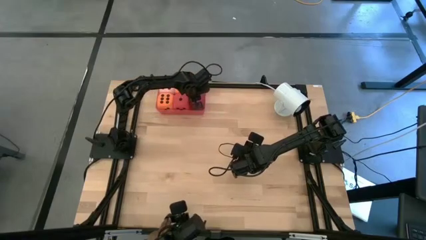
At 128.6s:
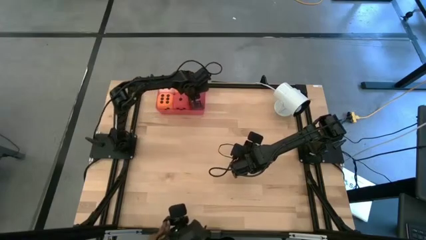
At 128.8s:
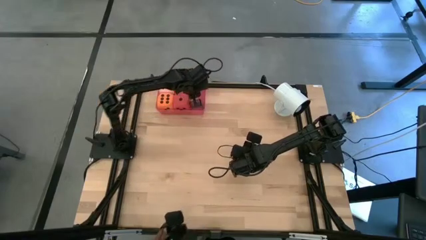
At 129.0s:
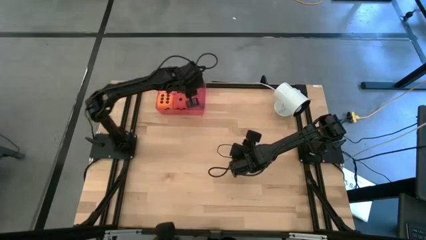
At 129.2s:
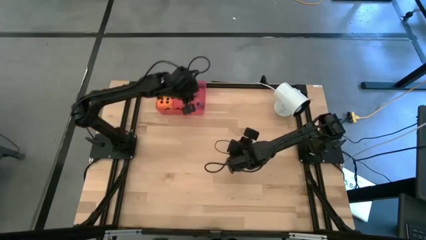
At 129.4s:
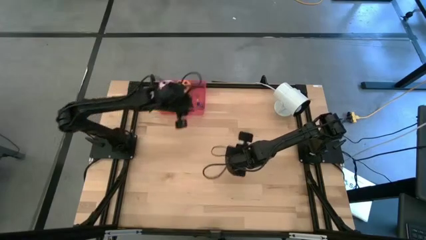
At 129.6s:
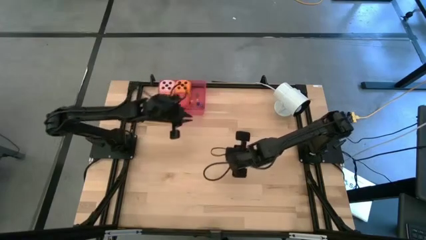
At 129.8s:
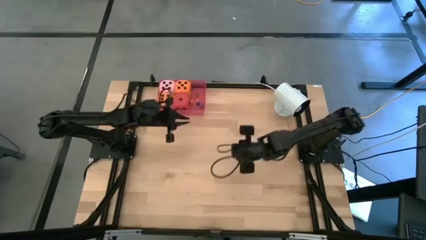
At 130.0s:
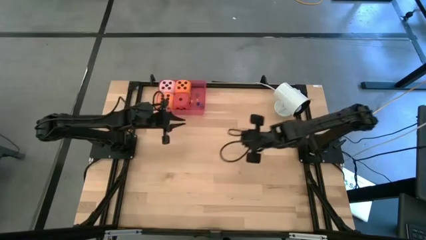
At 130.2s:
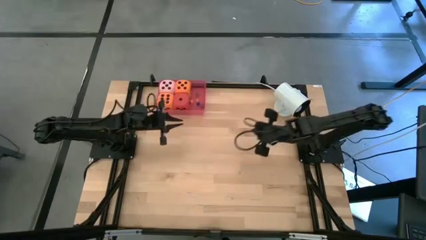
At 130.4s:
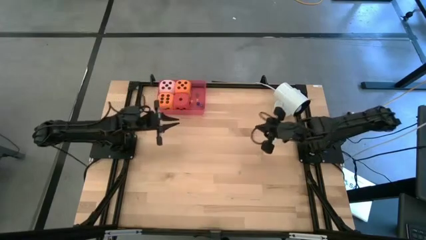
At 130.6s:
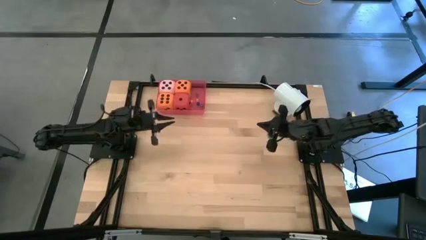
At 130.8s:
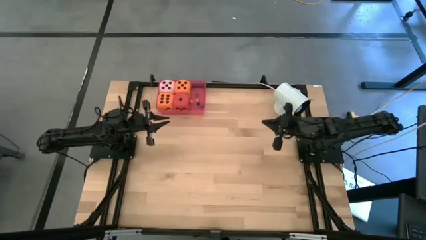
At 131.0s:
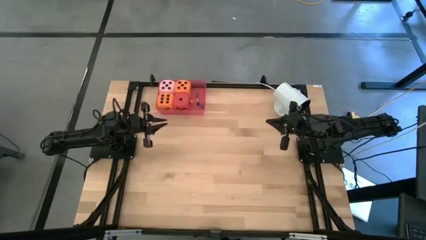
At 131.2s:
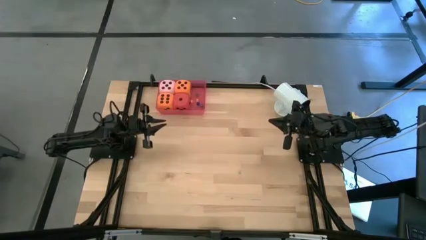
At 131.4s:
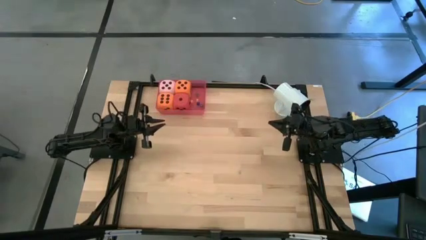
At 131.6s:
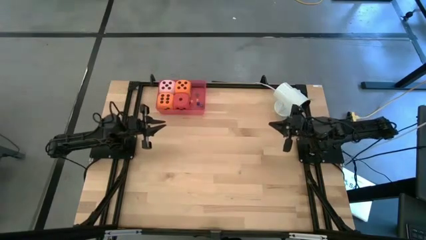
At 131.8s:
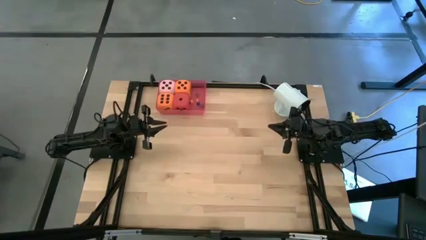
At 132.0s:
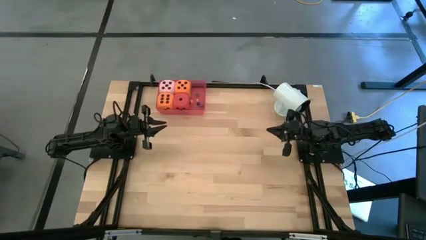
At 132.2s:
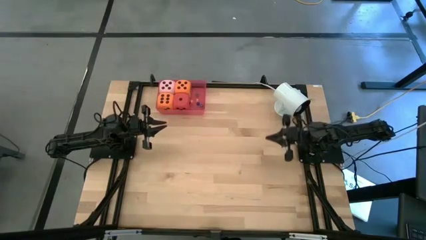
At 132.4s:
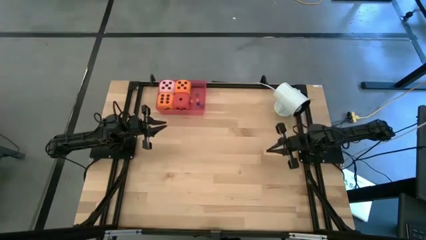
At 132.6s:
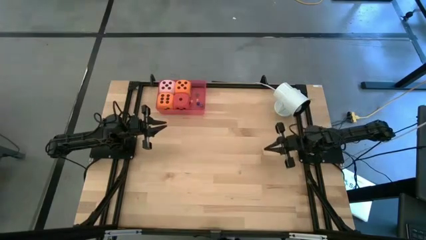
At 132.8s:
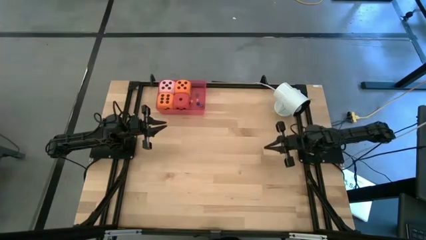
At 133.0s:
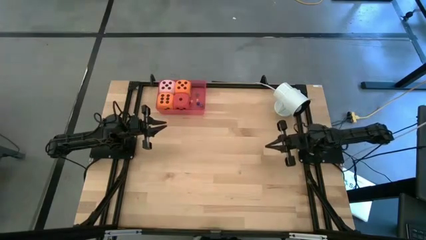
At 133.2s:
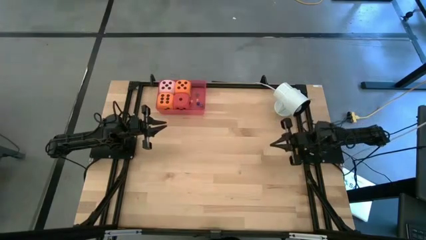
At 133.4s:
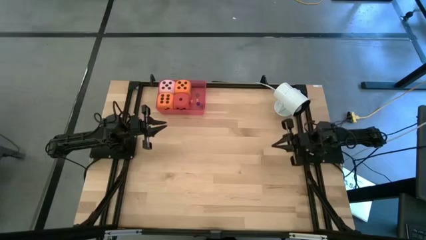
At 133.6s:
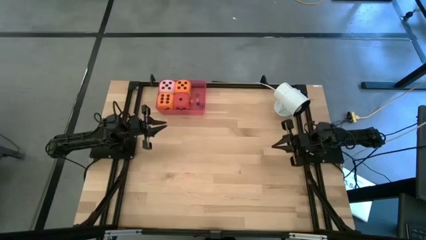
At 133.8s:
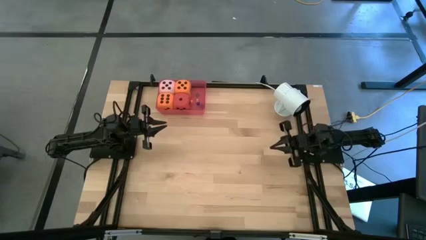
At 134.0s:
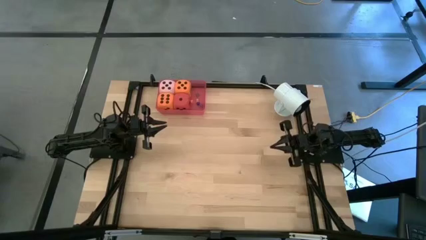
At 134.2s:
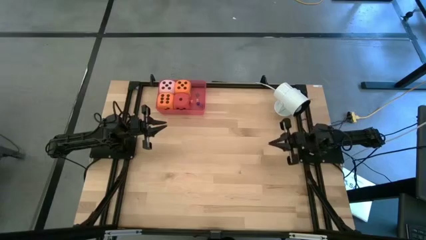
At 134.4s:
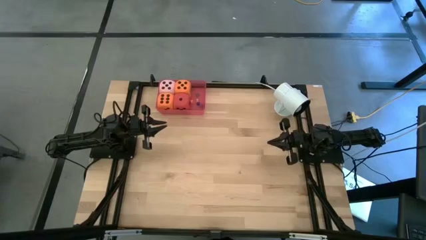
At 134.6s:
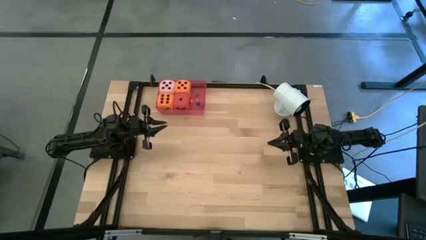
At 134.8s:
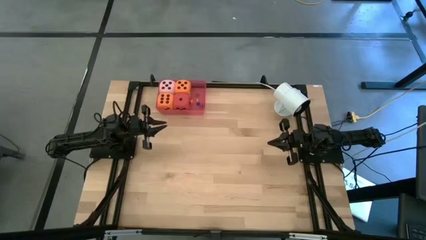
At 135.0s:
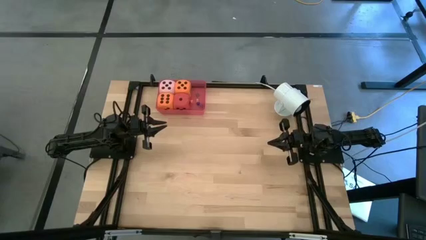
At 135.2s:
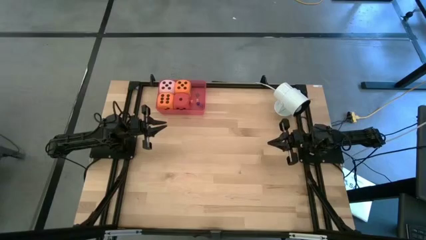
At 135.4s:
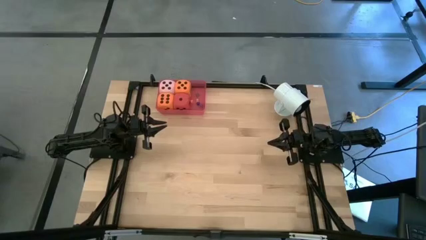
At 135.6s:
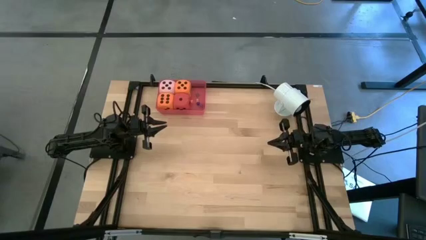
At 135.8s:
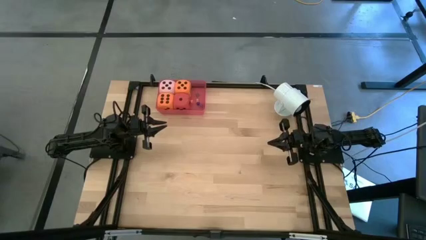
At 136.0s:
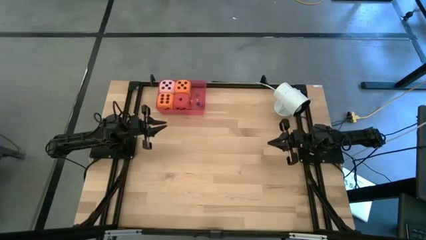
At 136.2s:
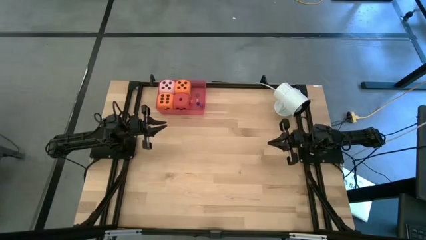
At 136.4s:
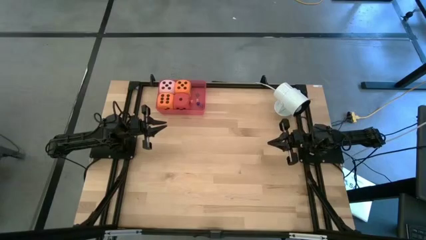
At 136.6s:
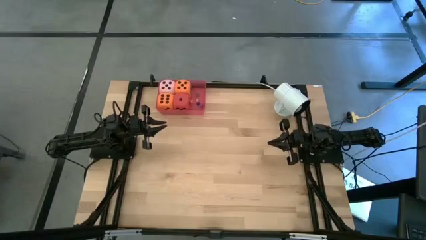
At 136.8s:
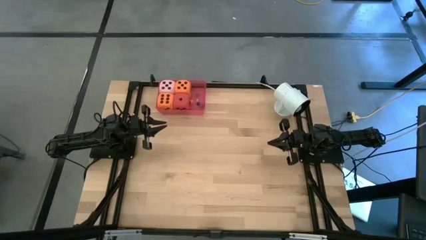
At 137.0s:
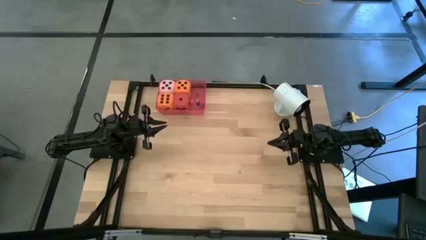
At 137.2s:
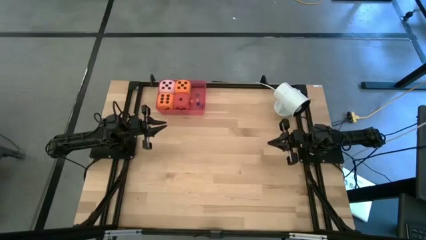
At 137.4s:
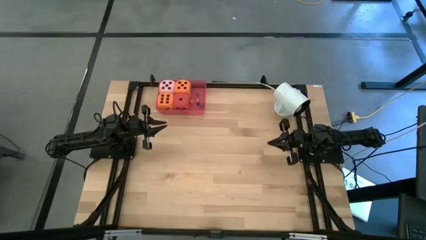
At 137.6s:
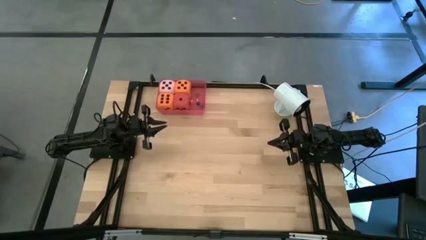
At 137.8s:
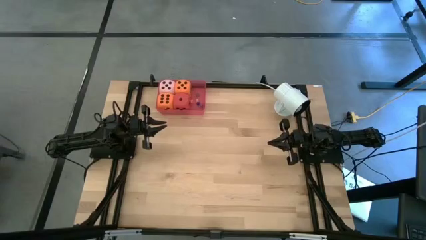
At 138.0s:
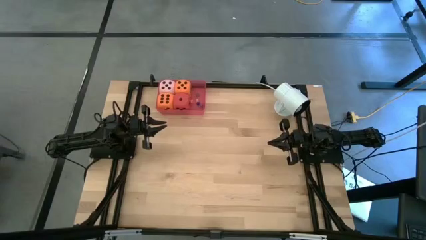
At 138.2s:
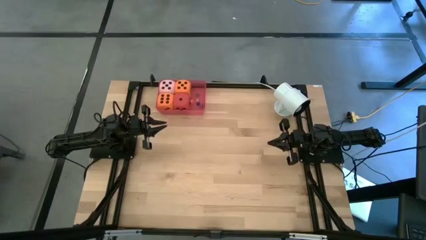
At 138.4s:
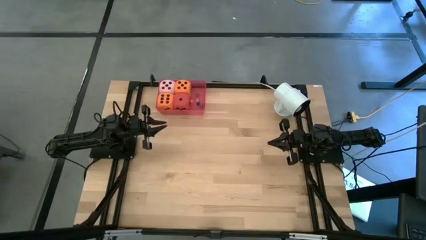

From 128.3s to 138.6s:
Task: Pick & Place Dice
Return to Home Position

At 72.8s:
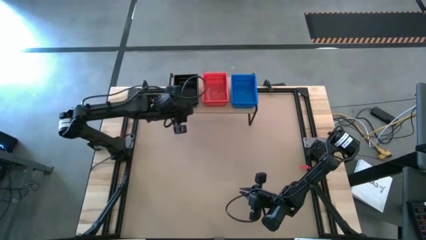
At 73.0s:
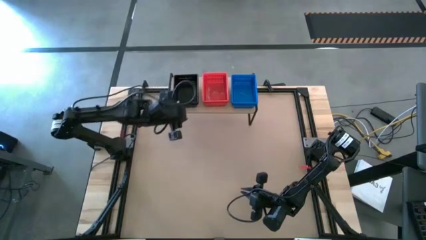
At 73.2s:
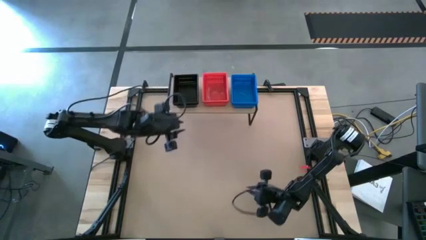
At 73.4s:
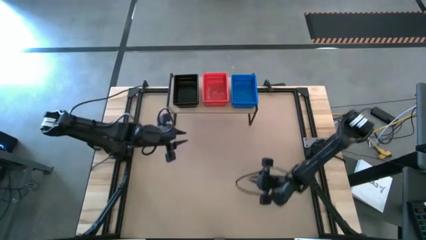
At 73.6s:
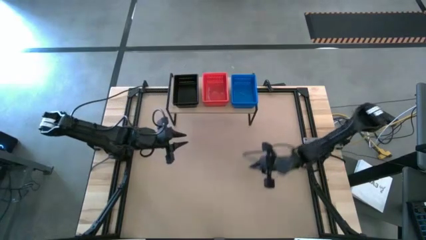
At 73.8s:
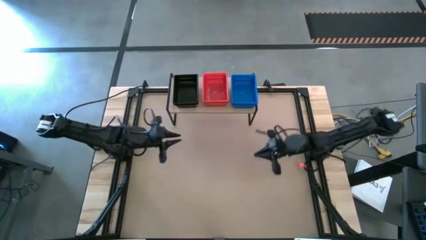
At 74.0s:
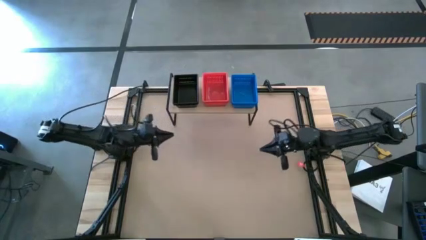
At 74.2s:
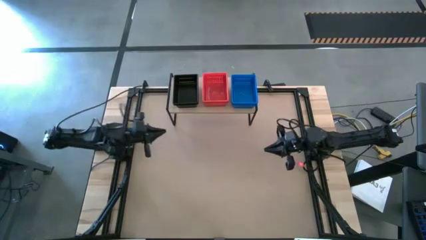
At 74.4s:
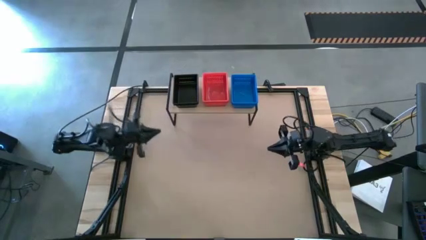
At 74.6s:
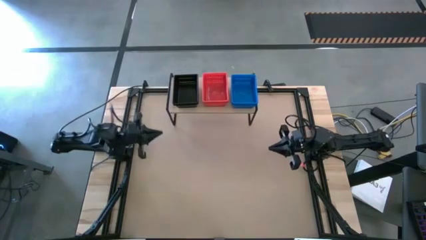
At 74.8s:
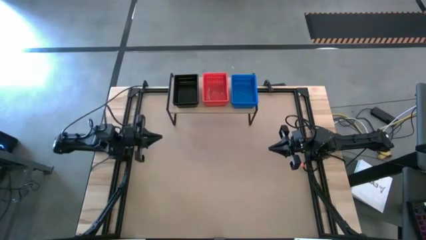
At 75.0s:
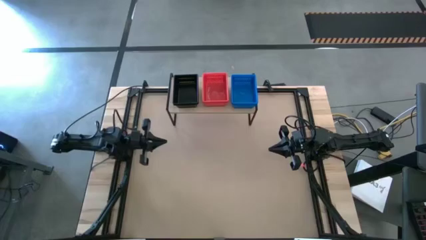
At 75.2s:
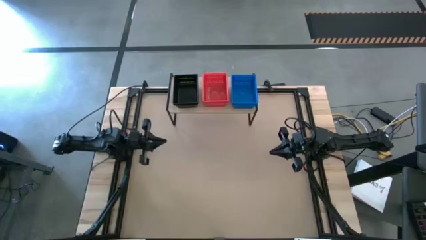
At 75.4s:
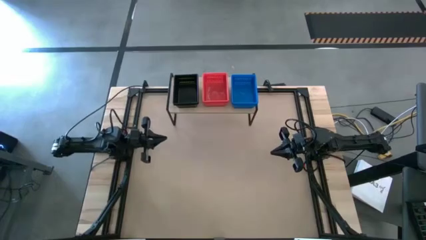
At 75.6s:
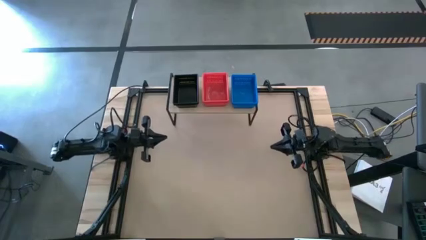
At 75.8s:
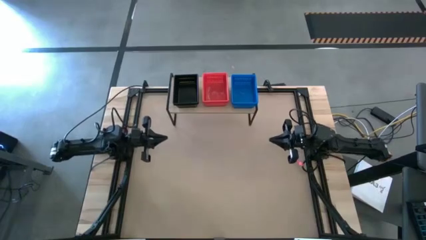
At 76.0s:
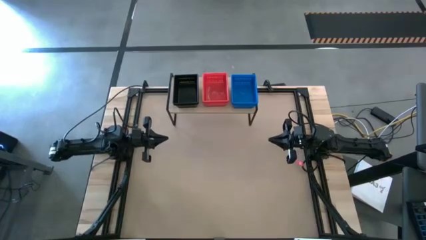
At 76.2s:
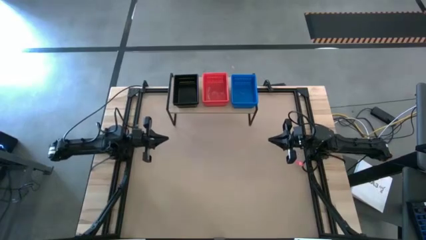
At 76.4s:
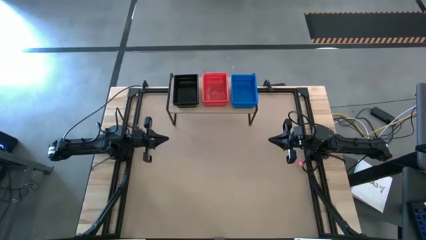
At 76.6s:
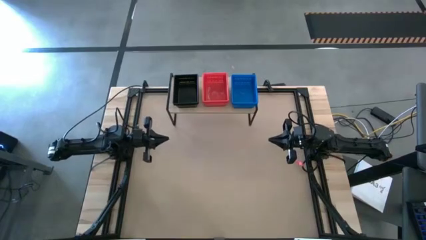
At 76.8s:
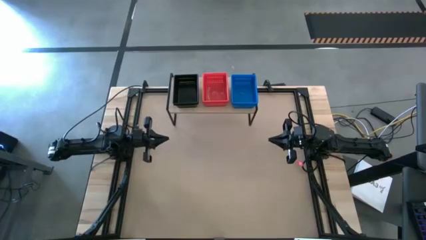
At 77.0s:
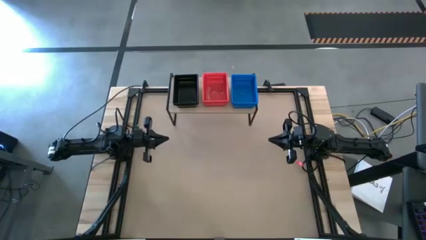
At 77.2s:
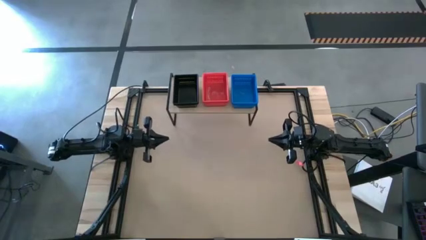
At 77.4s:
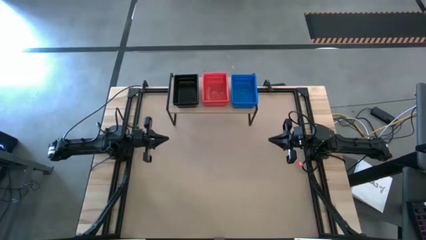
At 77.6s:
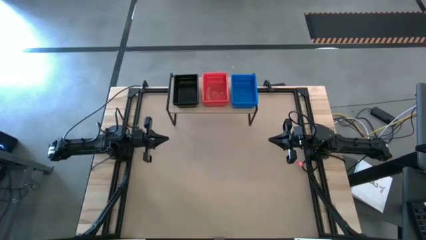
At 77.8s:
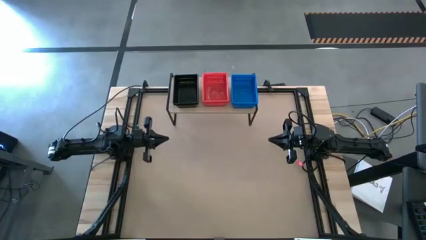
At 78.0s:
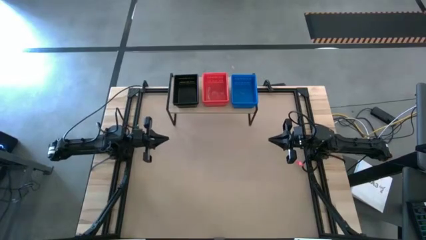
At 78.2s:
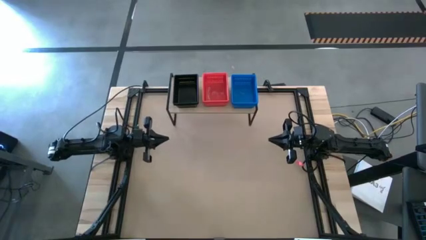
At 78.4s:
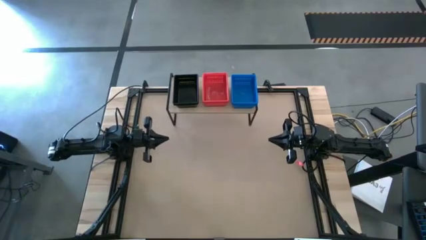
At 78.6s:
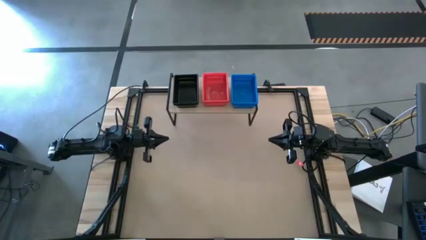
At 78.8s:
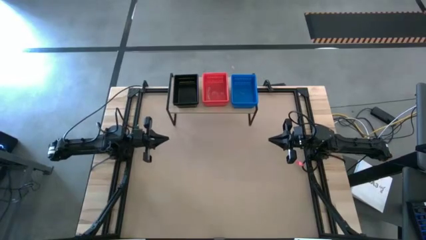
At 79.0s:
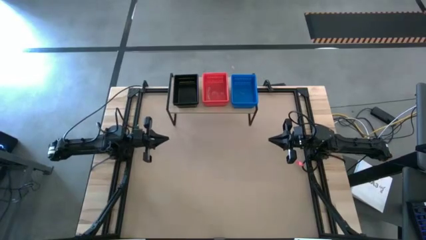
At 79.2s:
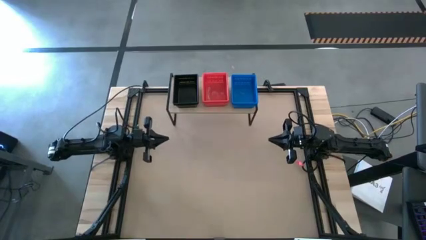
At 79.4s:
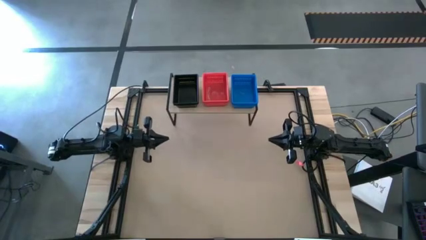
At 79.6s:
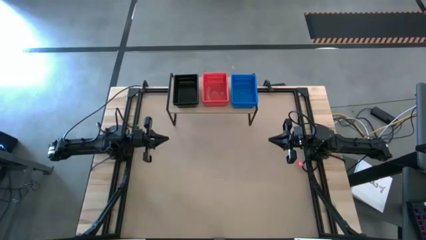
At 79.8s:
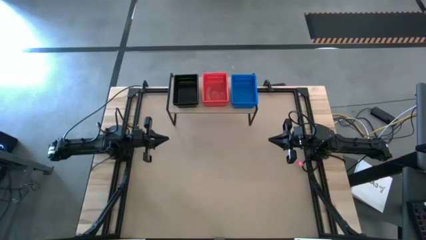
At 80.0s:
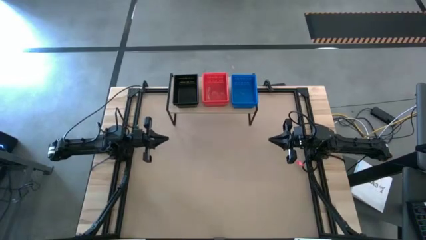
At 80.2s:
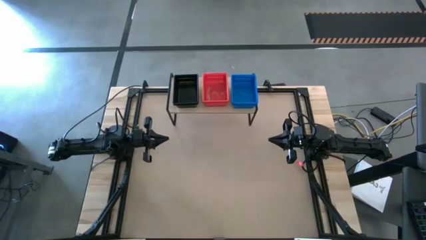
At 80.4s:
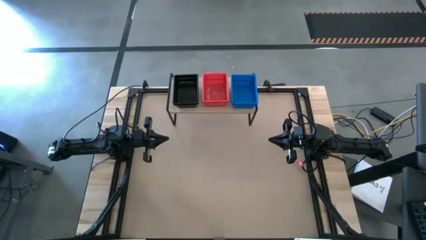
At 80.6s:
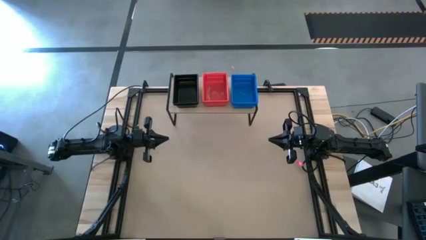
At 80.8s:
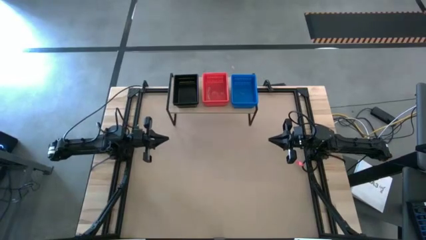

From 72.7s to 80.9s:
Task: Stack baskets on shelf by color
Return to Home Position
